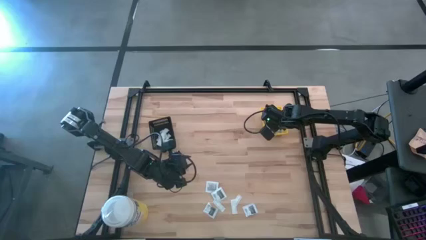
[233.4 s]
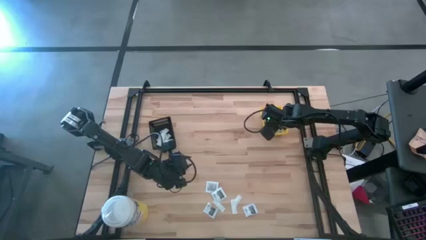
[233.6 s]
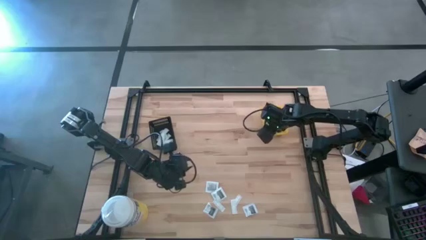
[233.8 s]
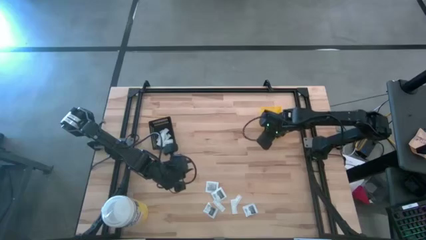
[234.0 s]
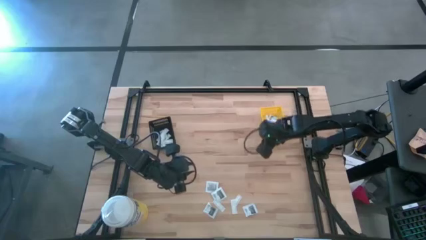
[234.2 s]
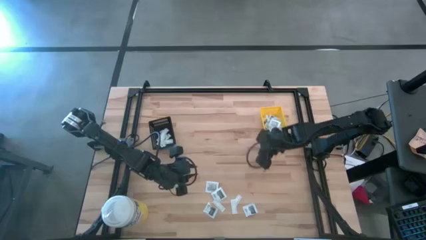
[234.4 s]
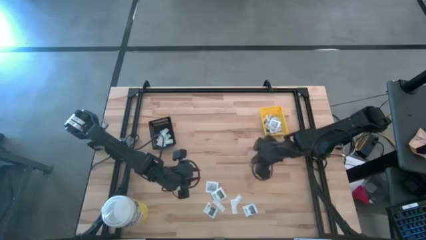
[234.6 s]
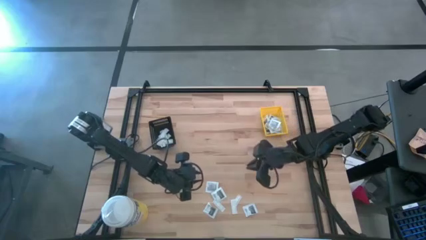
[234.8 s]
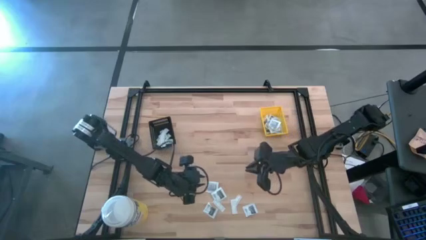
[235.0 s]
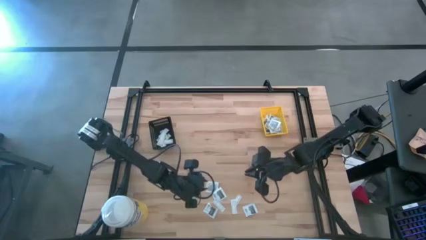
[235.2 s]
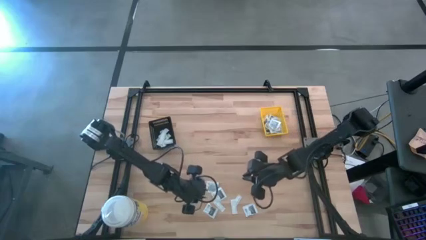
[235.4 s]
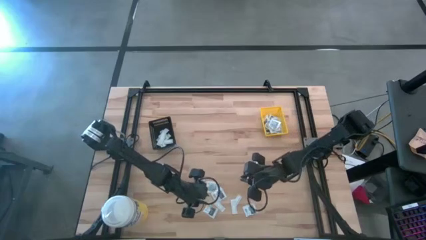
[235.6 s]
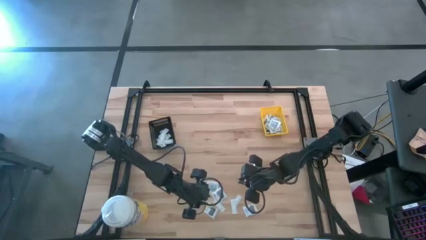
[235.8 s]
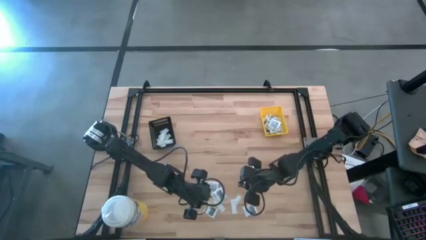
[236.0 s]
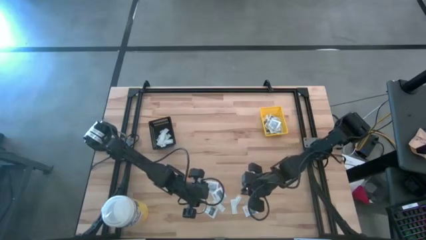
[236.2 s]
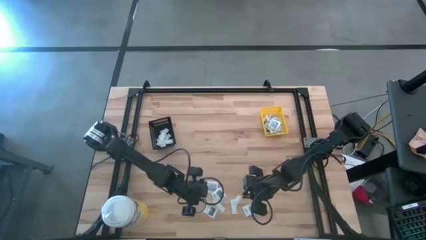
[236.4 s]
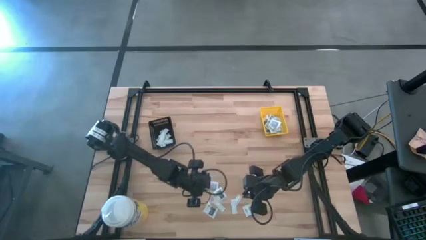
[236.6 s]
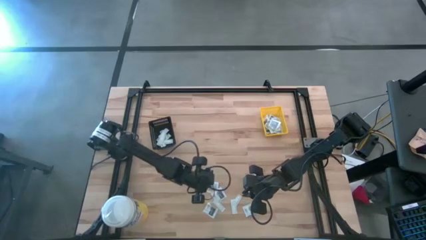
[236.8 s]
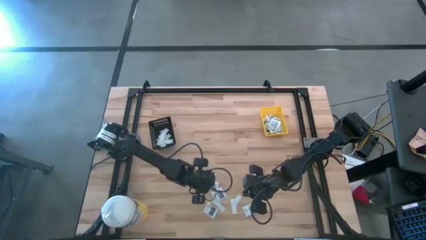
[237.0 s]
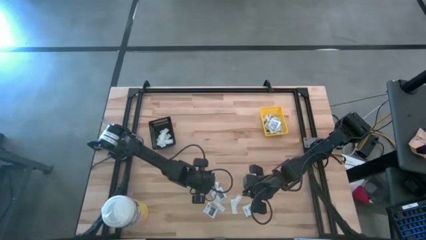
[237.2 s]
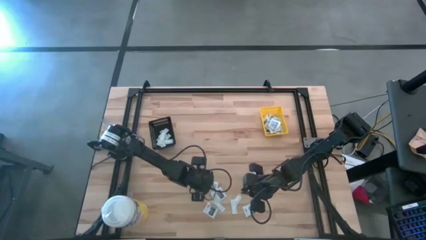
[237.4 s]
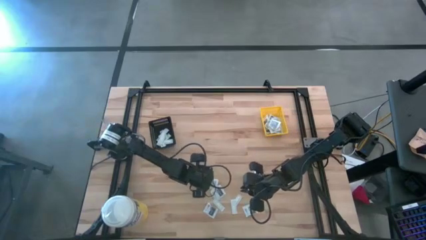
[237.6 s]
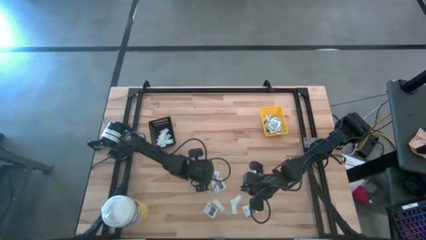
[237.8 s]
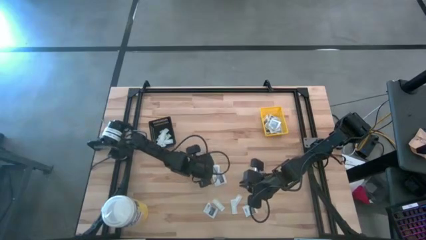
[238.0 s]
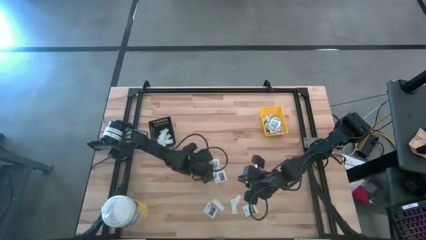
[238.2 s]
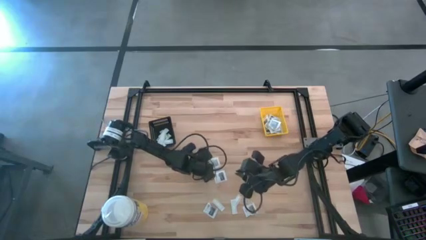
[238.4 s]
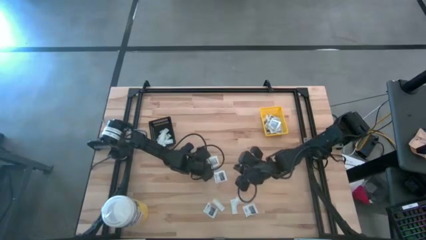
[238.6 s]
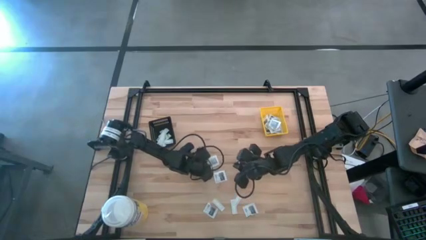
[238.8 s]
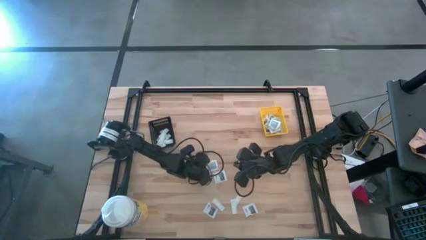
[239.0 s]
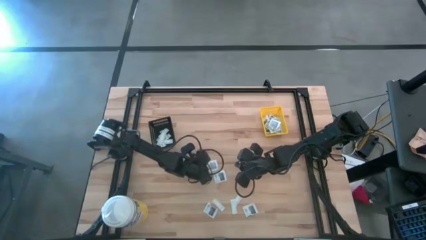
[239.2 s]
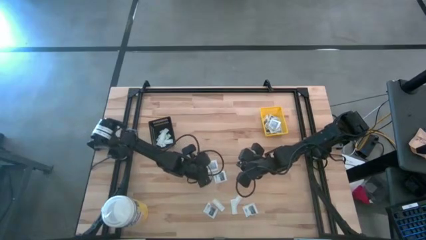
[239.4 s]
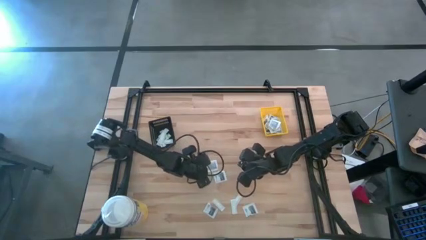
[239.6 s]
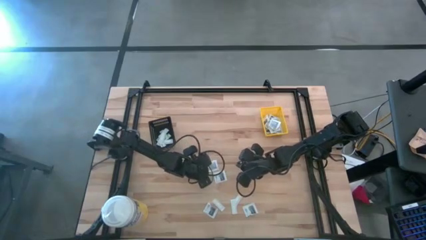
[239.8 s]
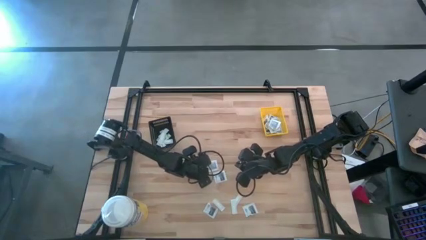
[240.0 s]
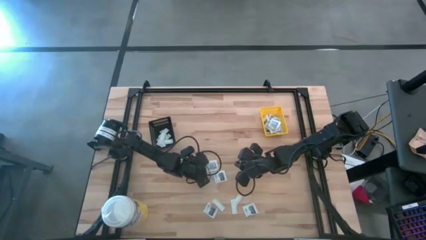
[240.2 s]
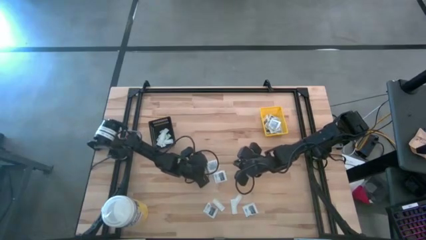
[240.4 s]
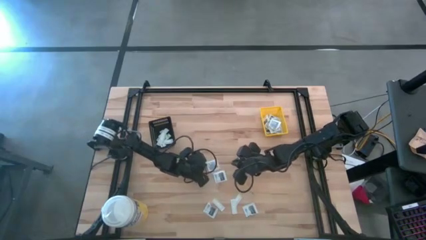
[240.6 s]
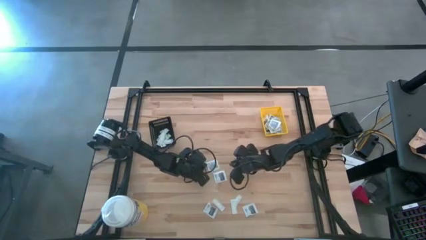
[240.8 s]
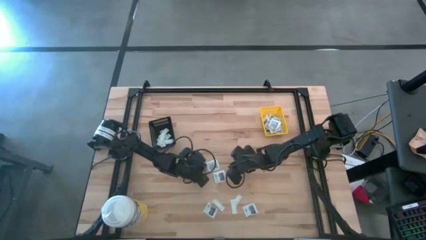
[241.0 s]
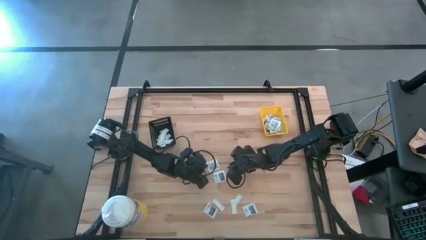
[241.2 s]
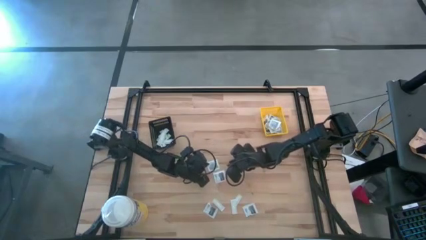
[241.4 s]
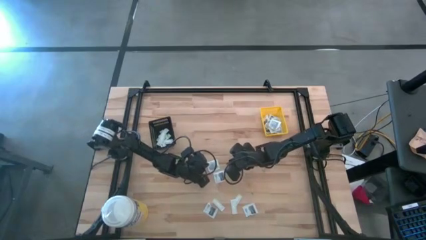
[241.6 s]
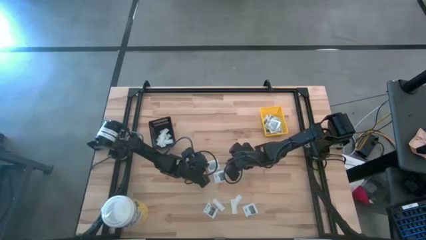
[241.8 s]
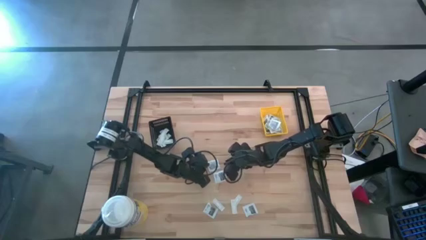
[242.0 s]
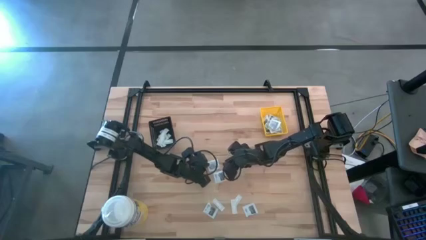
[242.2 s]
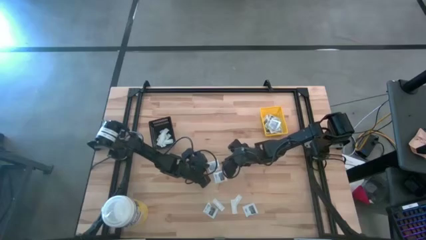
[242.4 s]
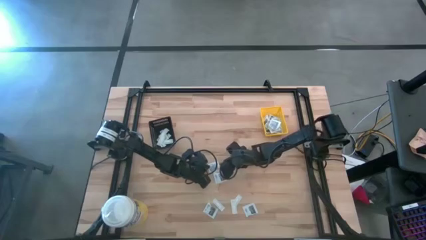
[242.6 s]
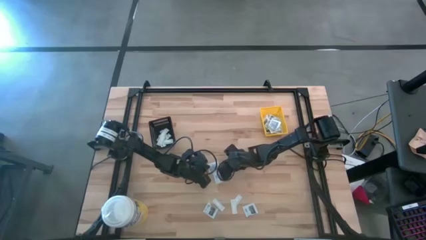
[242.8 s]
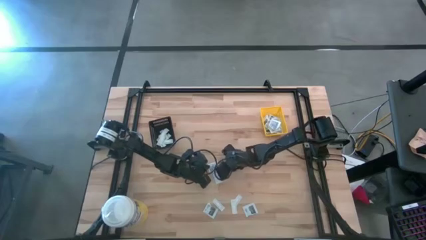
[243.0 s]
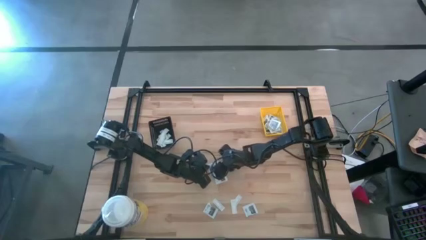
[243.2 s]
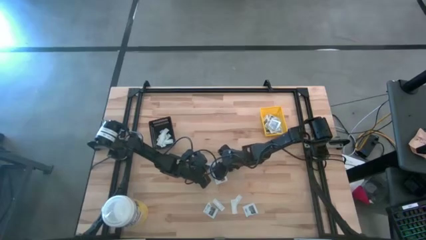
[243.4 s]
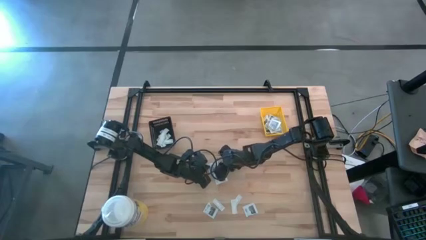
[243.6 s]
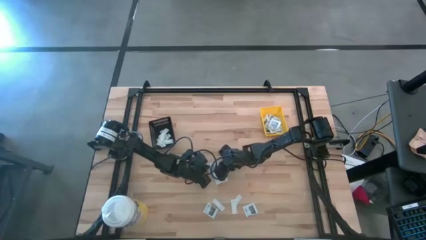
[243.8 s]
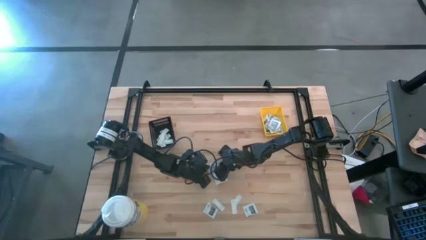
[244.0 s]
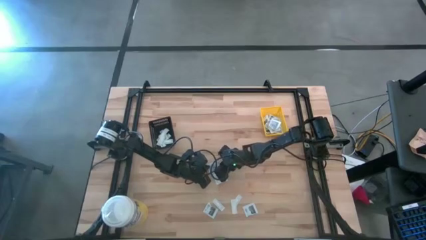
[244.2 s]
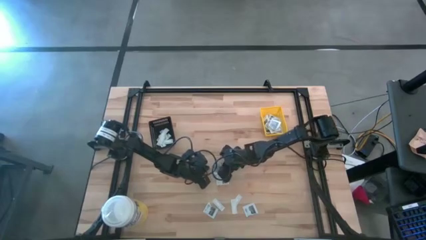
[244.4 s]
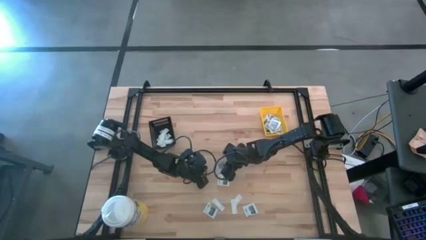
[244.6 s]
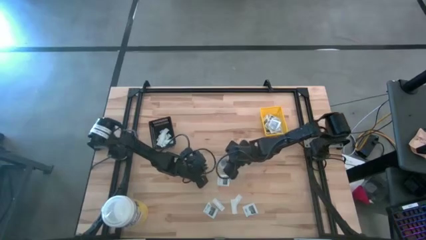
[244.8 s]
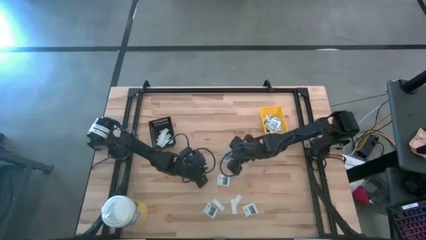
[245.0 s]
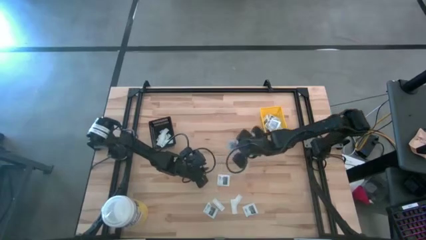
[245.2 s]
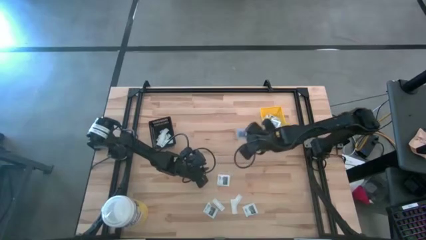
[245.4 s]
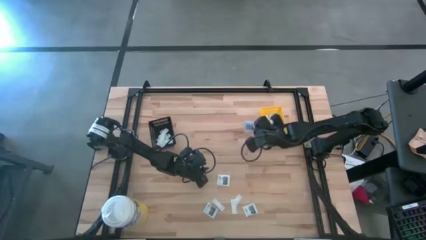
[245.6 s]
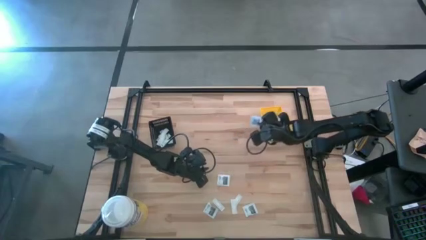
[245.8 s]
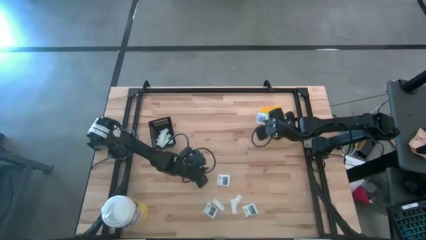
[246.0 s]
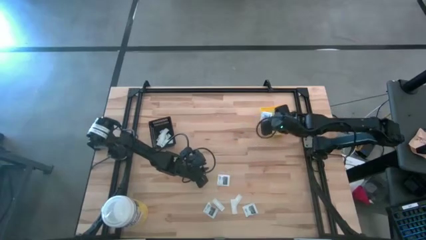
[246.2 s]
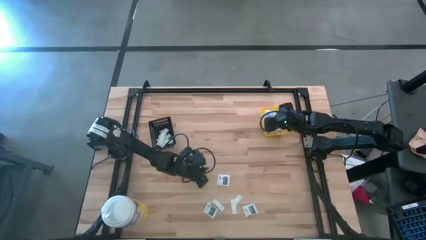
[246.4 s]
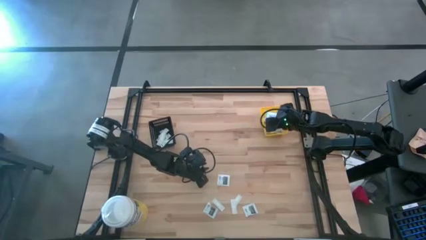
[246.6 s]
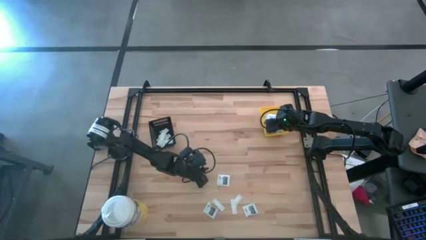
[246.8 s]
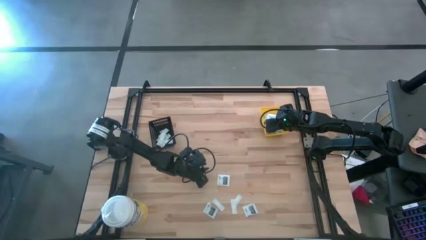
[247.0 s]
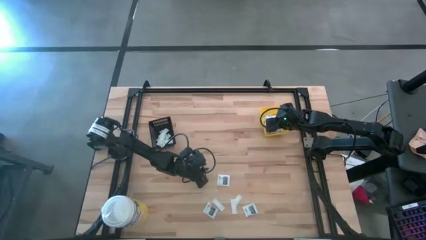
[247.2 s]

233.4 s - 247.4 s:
Task: Pick & Place First Aid Supplies
Put the black pad into the yellow bin
